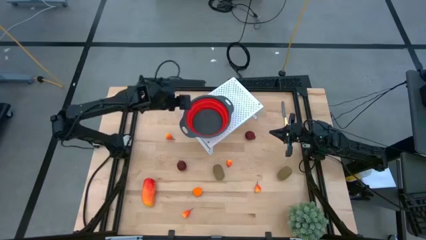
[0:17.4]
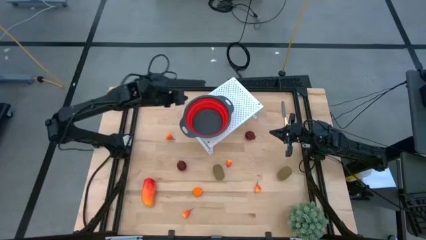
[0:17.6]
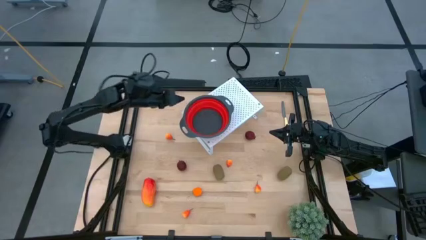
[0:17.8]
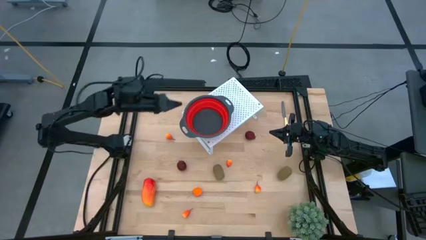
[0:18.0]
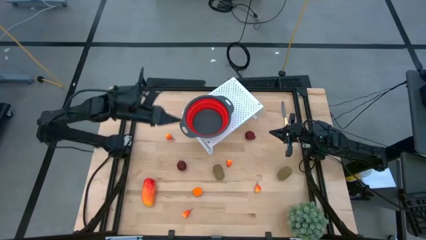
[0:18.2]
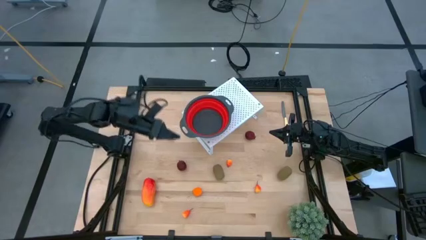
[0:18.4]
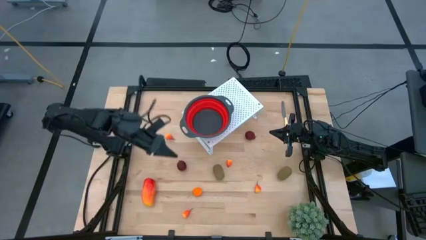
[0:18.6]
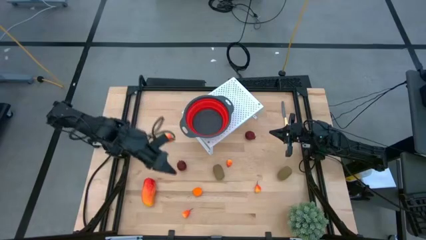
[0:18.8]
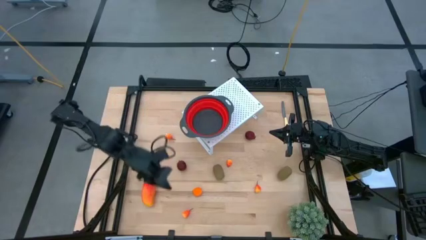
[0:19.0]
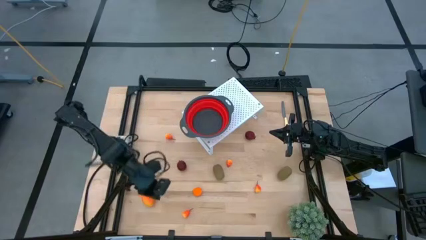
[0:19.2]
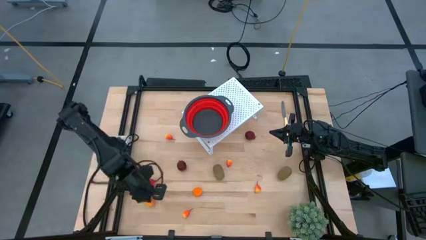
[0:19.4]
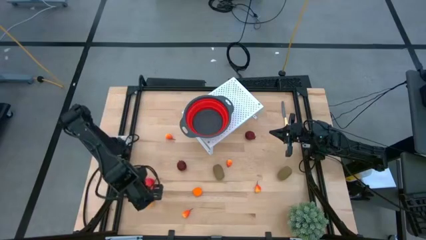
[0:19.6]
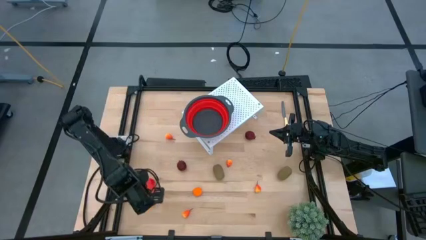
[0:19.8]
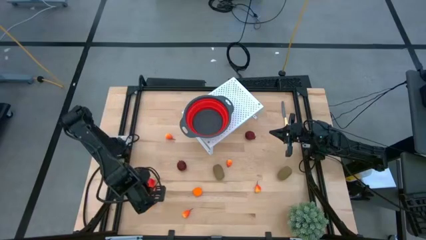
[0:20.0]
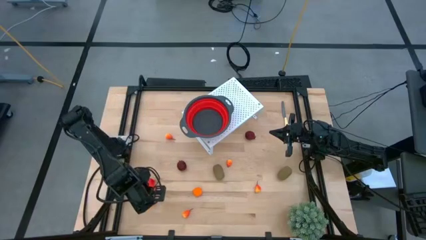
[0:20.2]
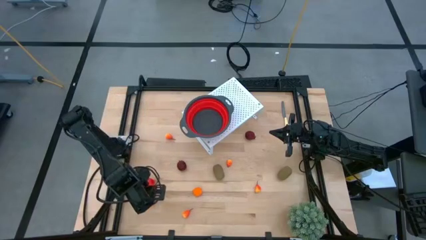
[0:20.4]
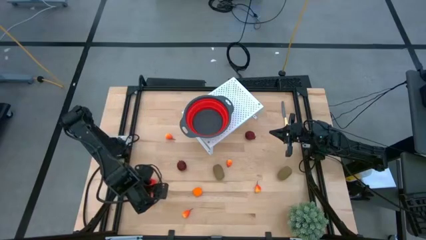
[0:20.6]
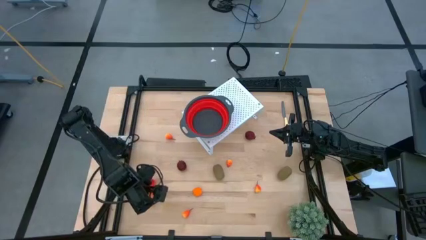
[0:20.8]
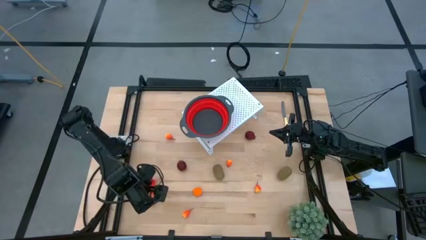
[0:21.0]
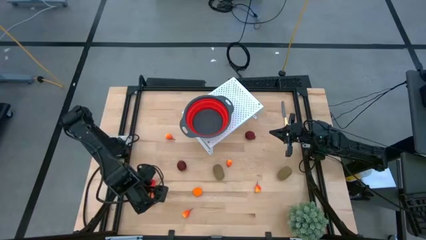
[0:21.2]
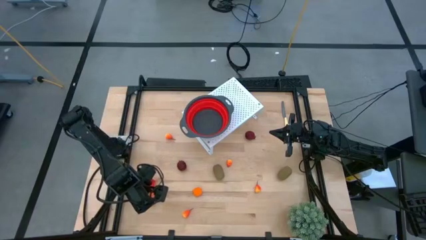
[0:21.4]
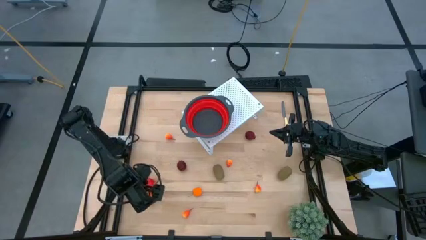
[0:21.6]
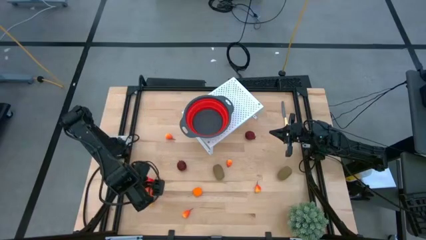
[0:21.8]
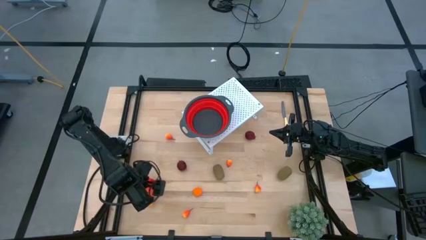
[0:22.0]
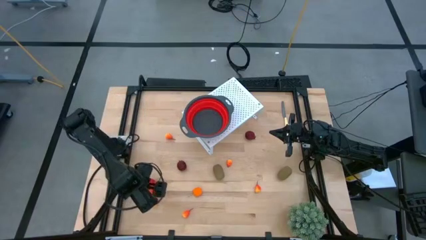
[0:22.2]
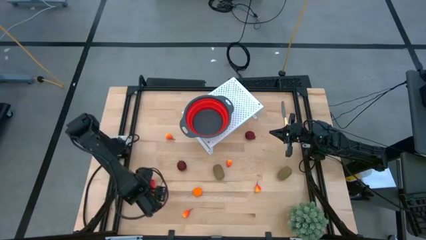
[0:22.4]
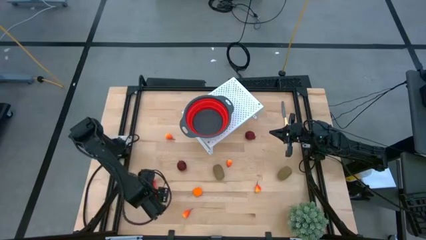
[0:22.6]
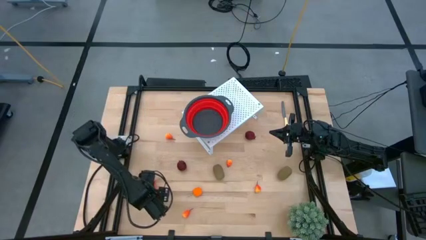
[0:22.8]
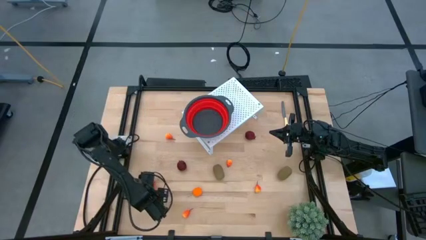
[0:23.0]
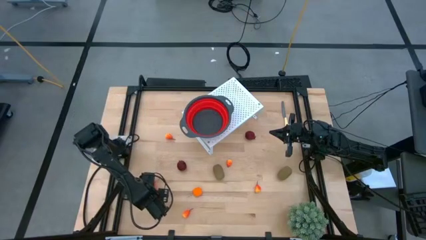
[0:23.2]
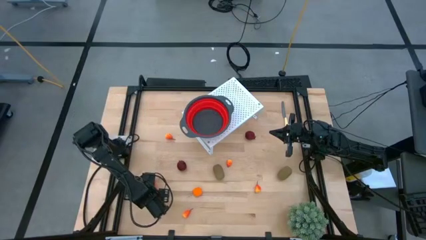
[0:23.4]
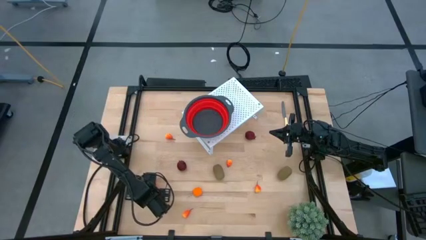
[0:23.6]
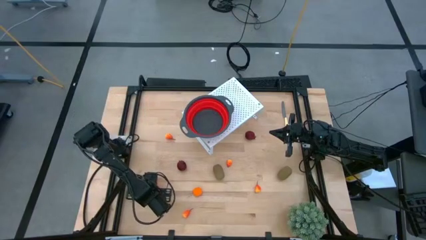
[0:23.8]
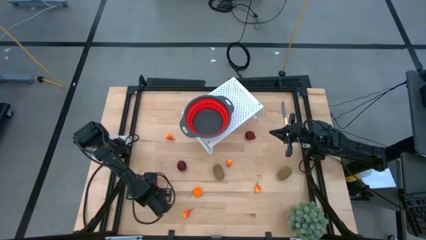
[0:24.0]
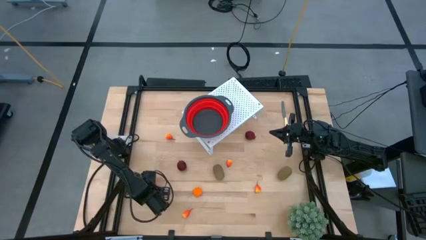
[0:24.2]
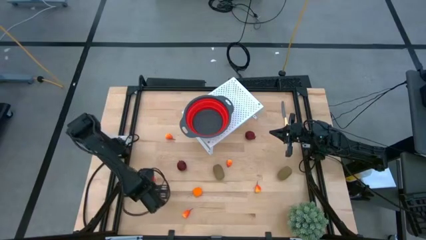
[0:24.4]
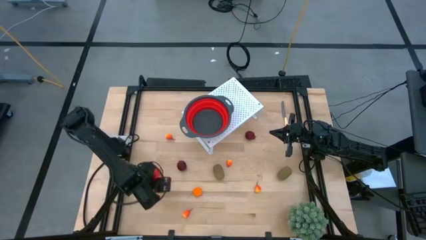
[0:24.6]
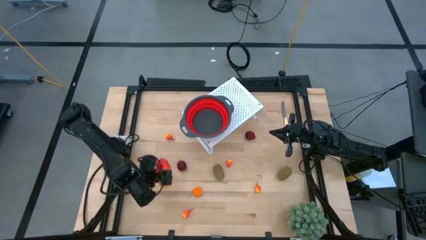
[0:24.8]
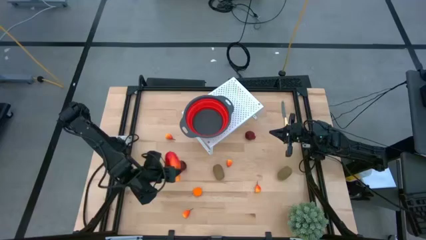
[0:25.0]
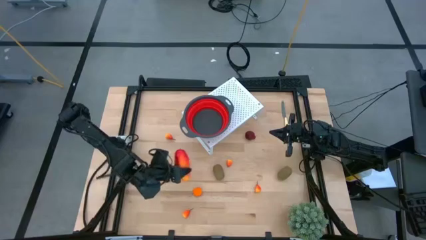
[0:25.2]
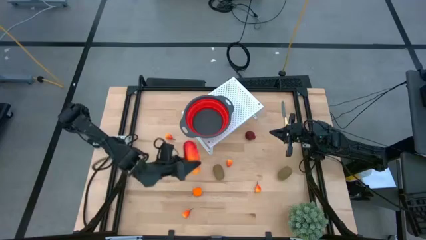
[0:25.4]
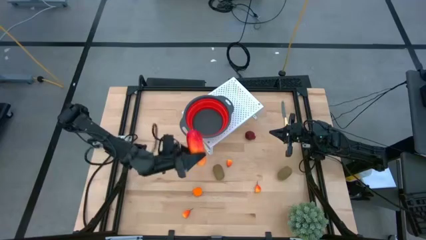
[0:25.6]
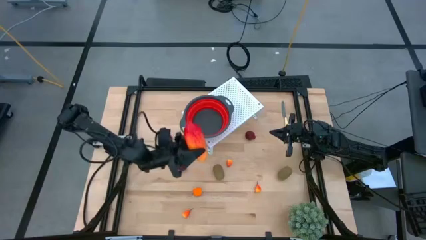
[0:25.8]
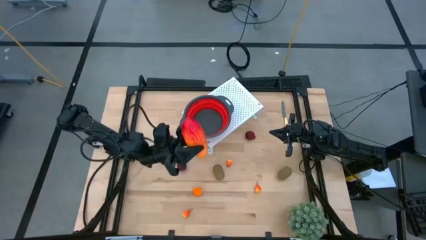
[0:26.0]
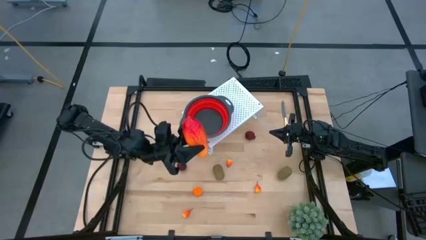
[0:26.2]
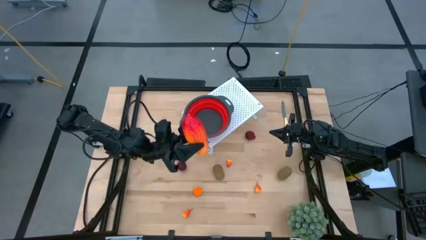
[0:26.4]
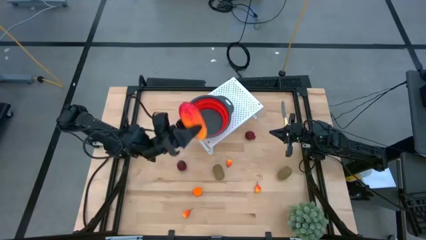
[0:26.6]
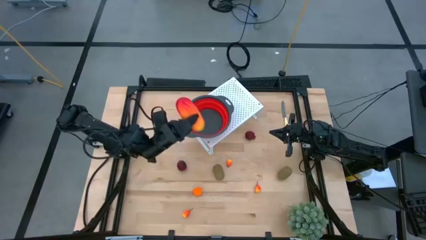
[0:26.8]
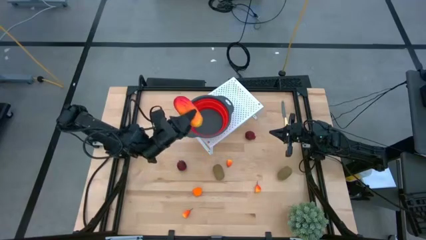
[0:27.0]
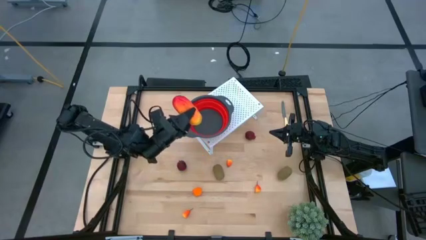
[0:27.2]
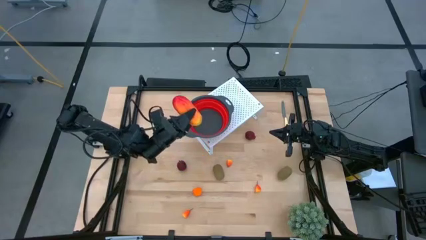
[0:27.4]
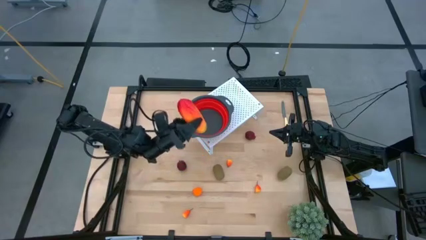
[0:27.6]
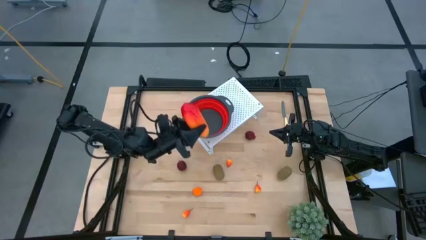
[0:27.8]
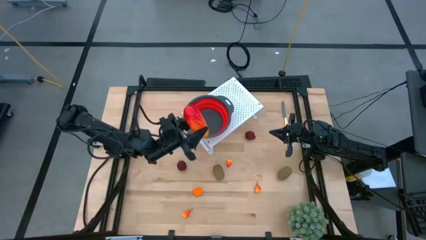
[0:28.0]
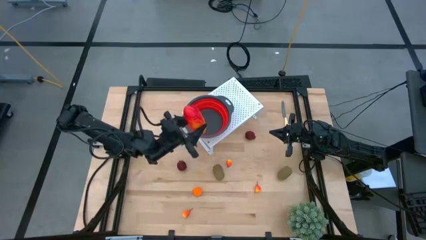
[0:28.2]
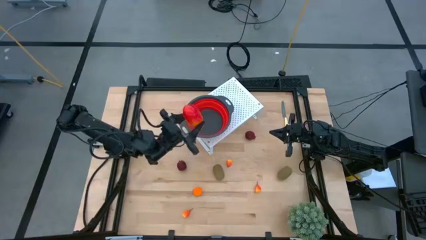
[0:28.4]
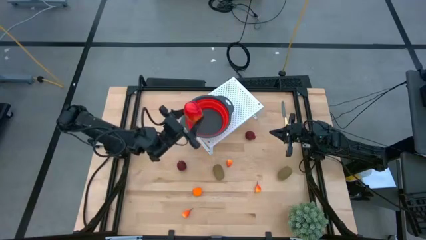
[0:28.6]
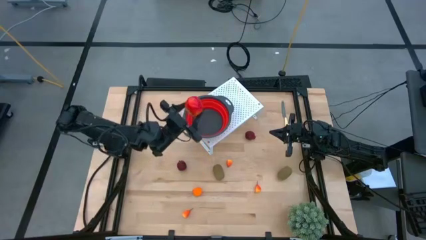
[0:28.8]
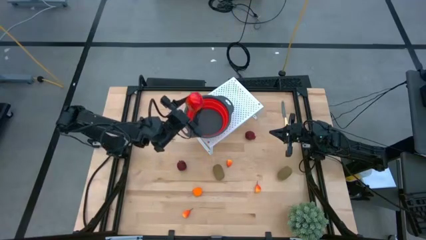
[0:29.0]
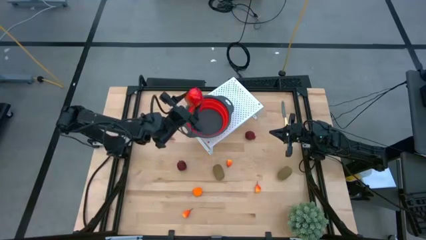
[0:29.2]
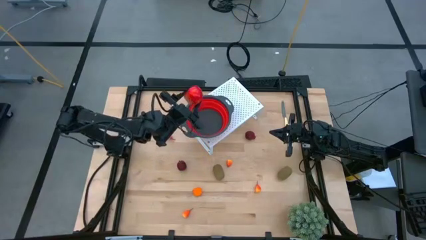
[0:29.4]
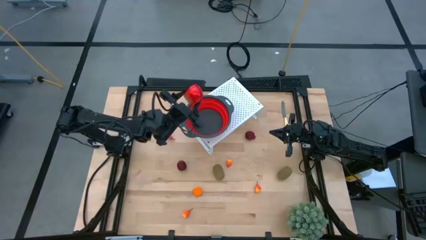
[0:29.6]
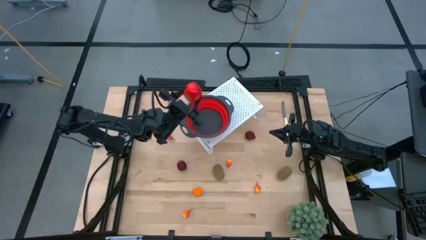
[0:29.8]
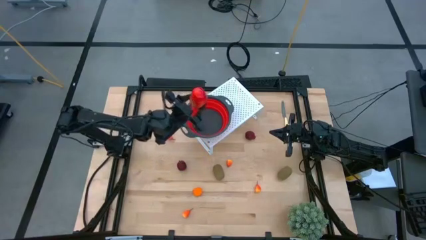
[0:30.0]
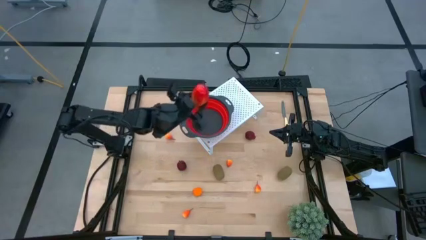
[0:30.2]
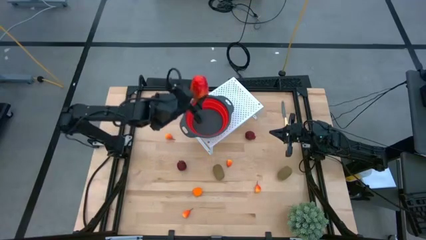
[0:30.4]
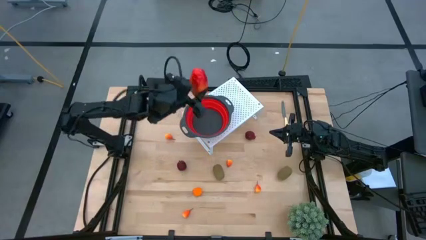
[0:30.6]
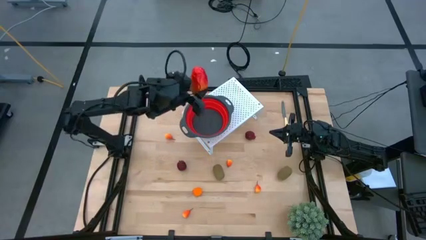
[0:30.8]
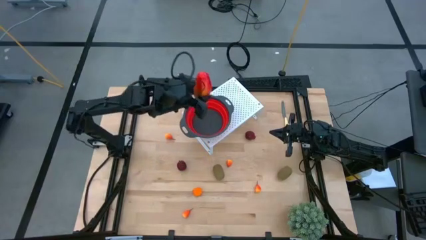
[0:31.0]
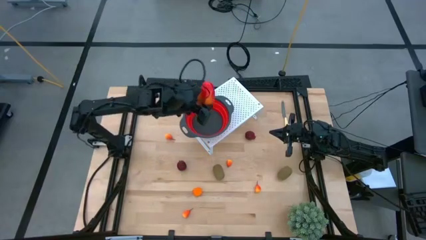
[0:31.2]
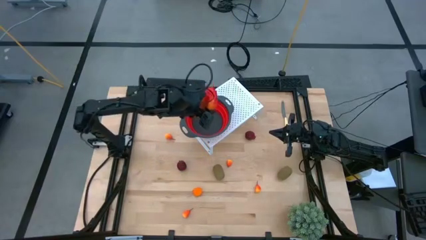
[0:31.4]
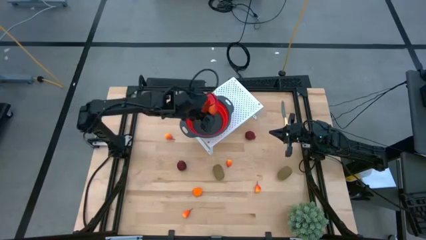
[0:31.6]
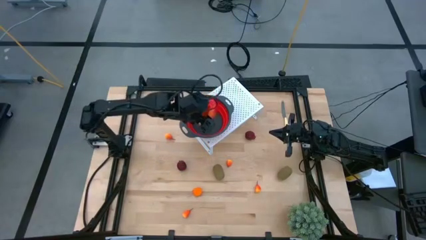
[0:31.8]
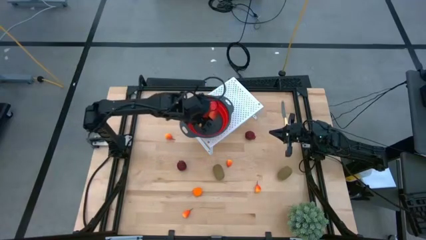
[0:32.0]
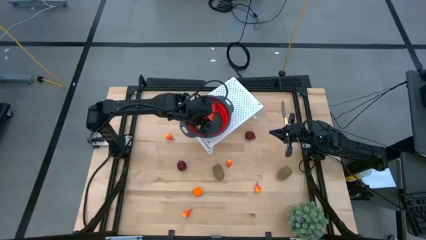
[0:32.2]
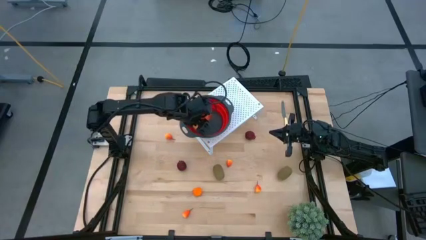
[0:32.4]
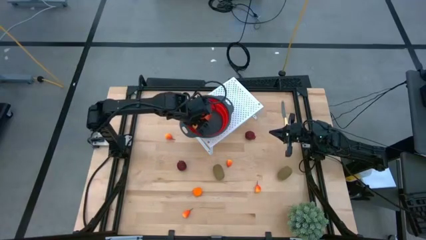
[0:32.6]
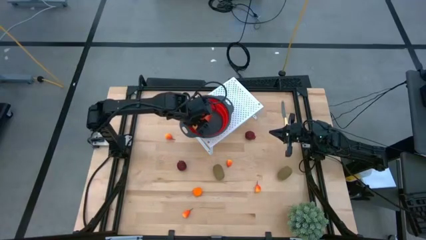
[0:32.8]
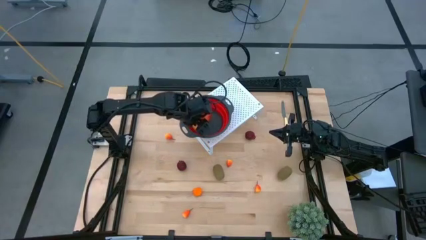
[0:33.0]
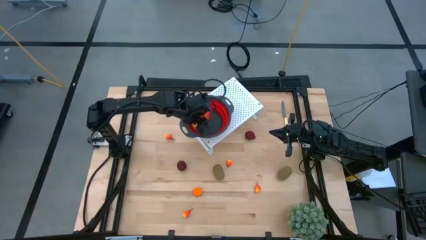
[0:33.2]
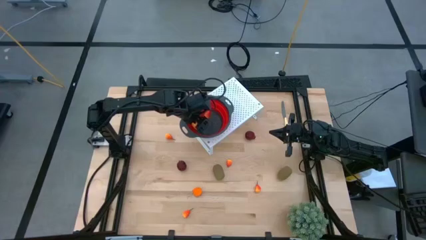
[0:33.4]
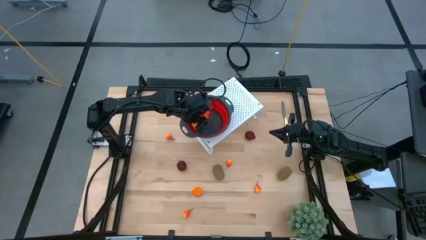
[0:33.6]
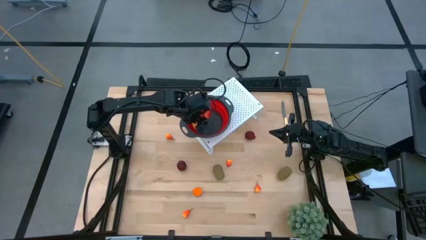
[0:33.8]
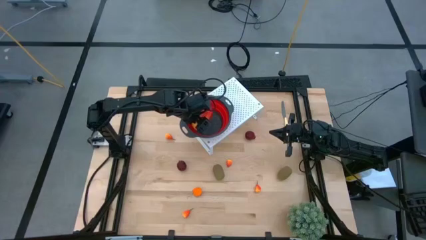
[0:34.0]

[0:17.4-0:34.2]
Task: Pick & Place Fruit
Put the mango into the red strainer bowl on the shelf
